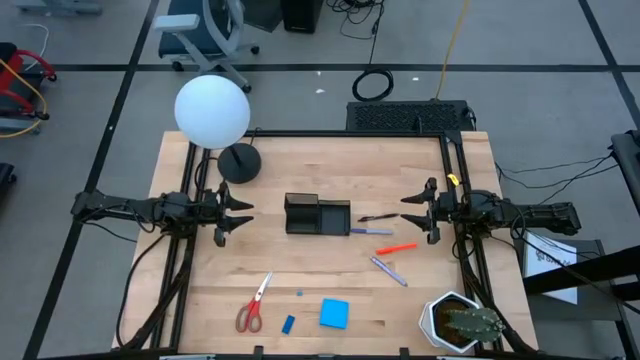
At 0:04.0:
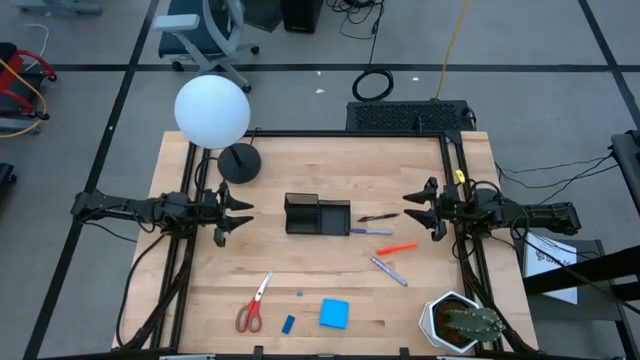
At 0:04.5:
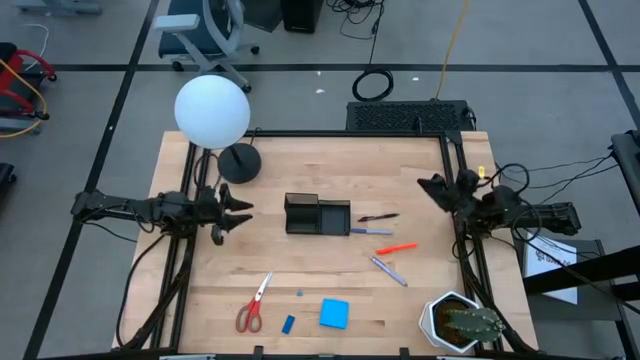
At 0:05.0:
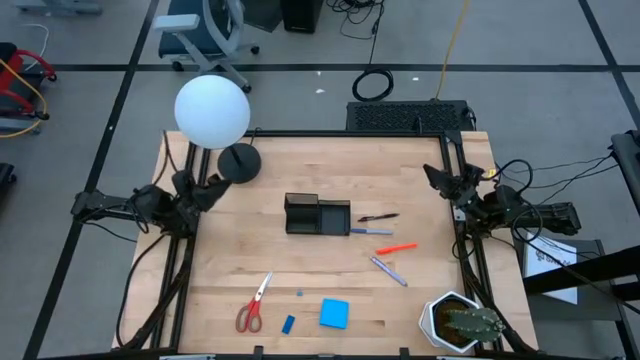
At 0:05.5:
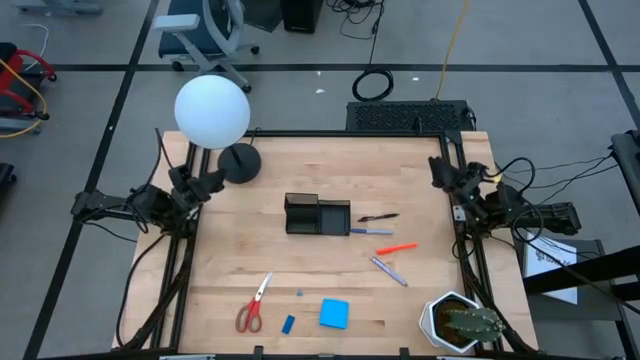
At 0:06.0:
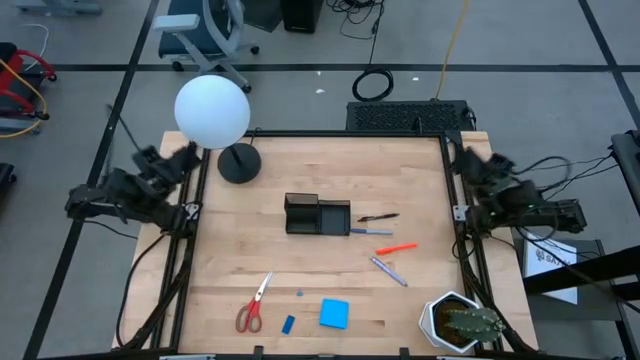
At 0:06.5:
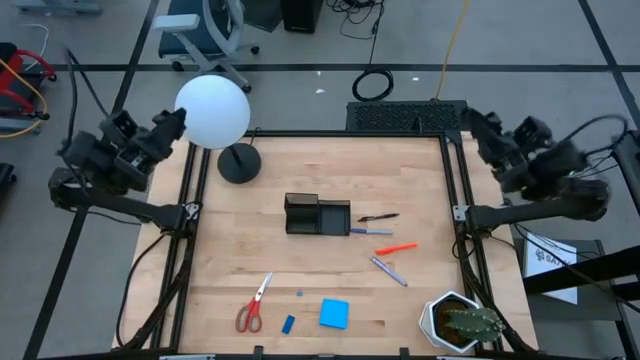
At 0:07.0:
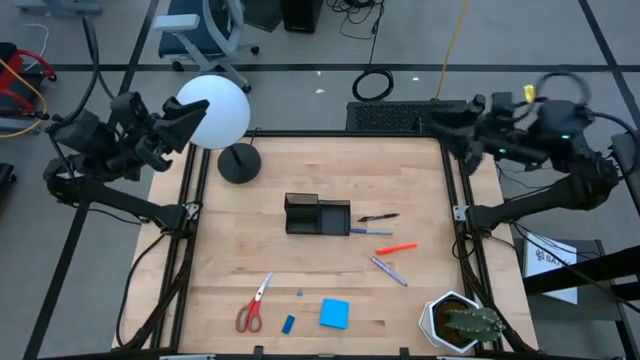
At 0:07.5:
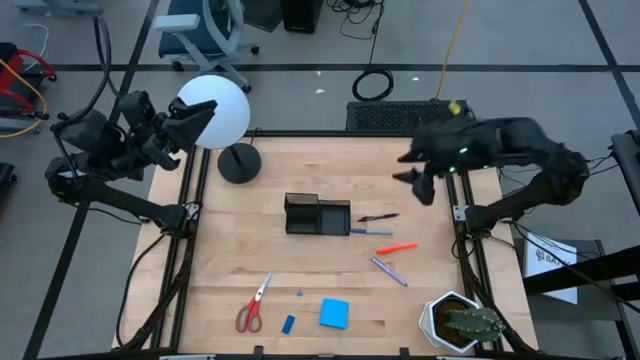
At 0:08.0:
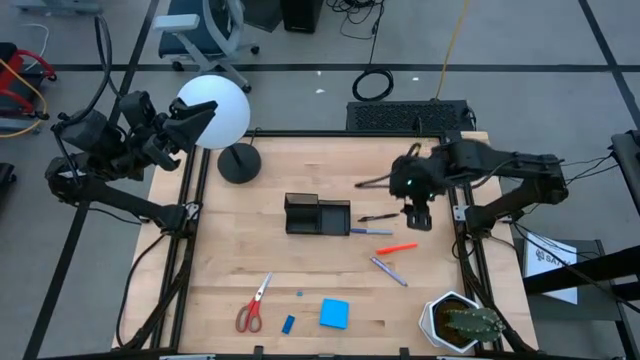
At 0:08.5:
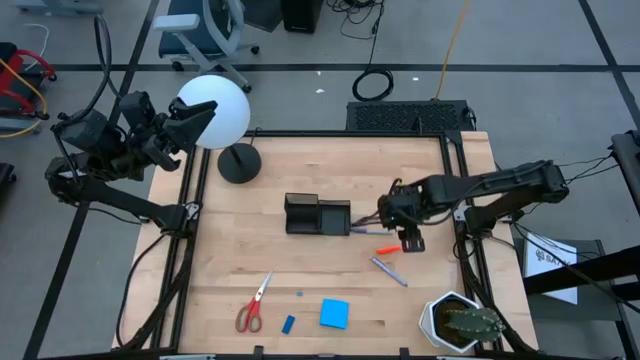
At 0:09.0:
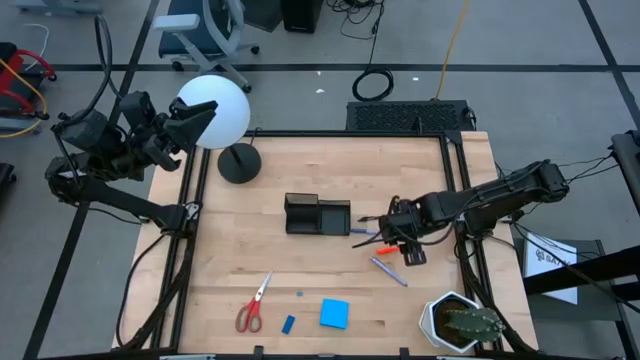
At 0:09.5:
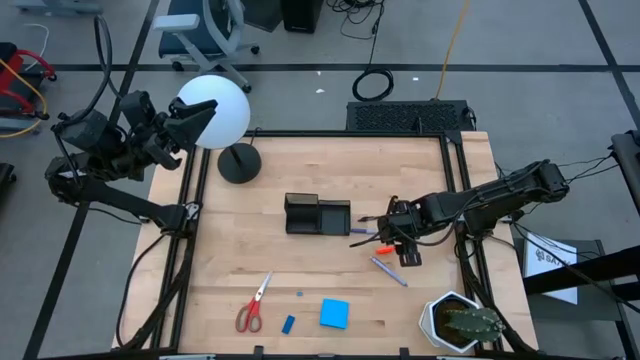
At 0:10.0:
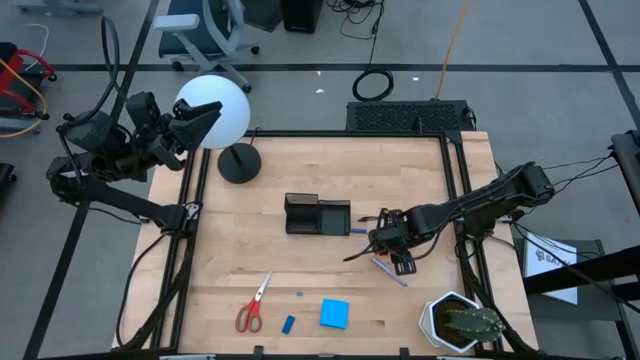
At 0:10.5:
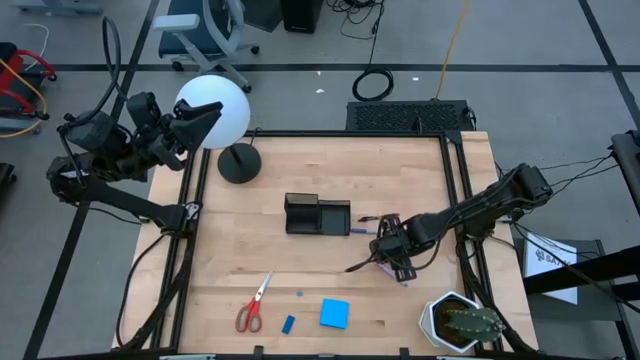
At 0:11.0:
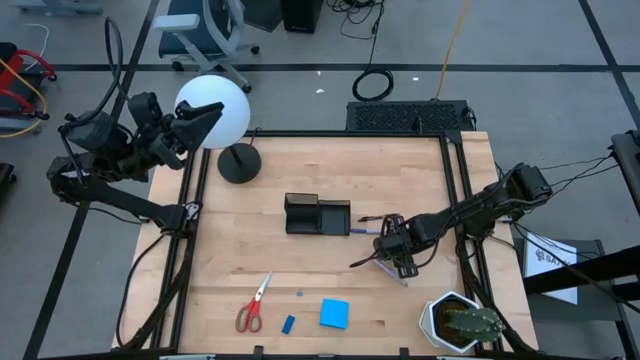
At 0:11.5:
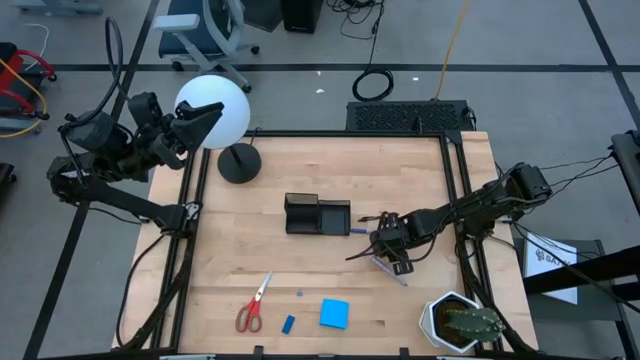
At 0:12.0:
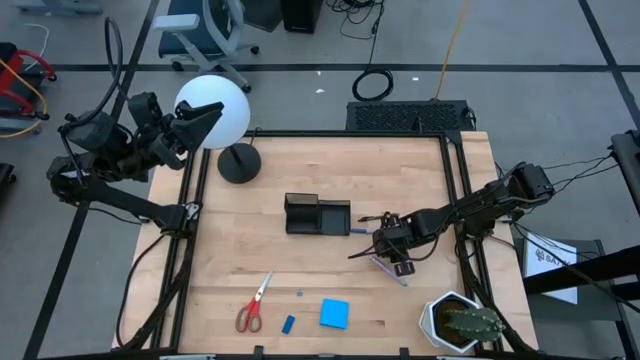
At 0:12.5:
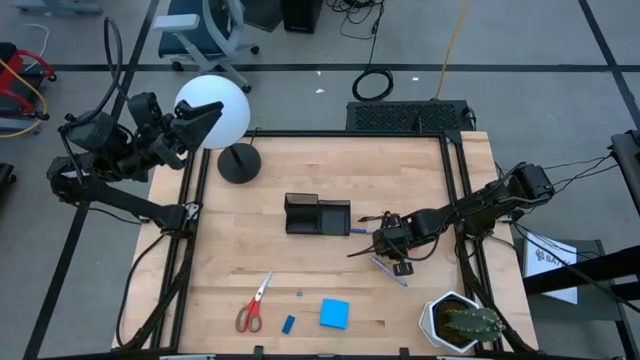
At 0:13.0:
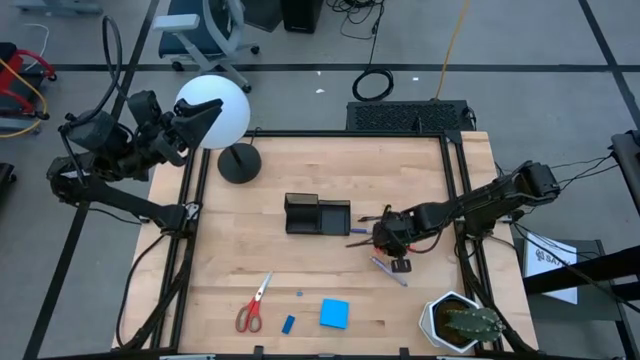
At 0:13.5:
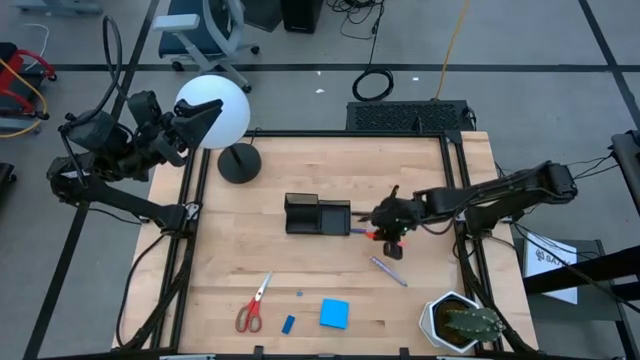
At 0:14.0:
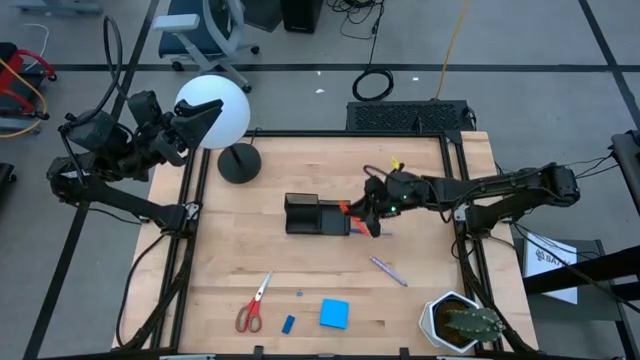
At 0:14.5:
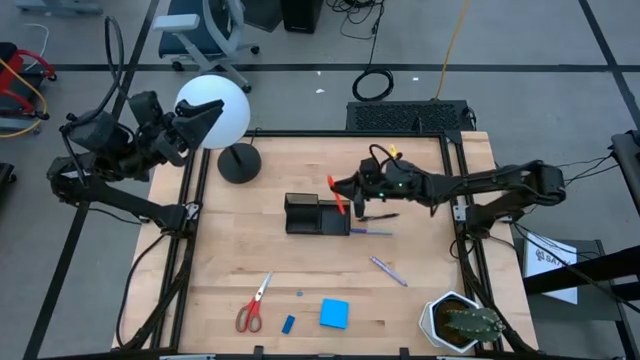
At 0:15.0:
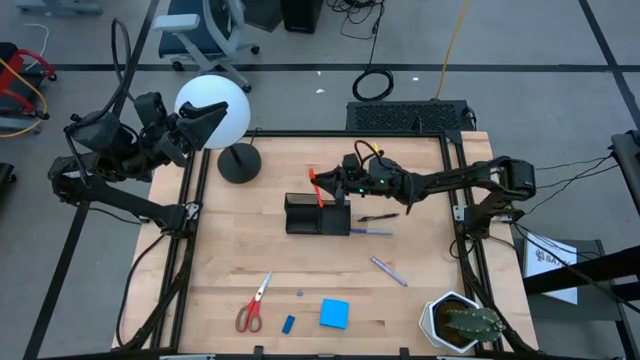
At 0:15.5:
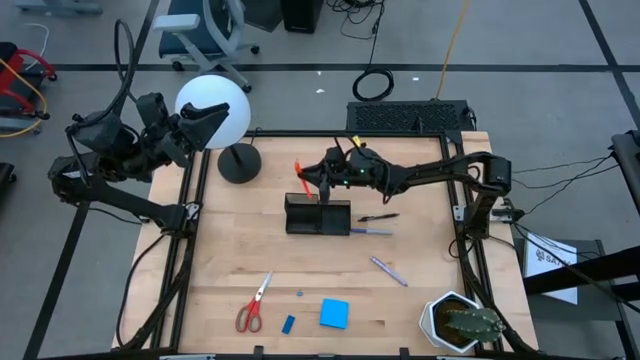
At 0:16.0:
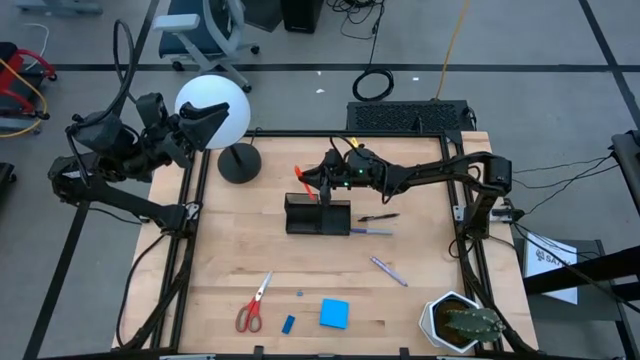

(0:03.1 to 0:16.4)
Task: Pick and place office supplies into organizer
Put the orange pen into the desk organizer

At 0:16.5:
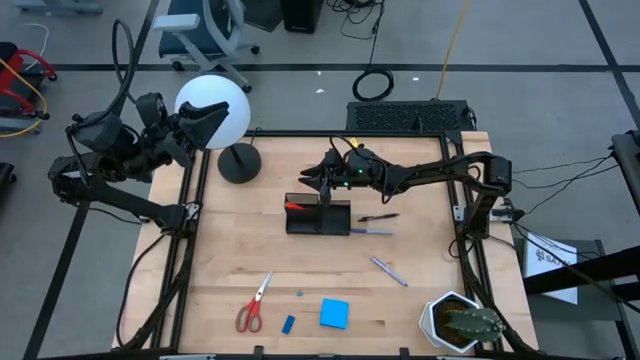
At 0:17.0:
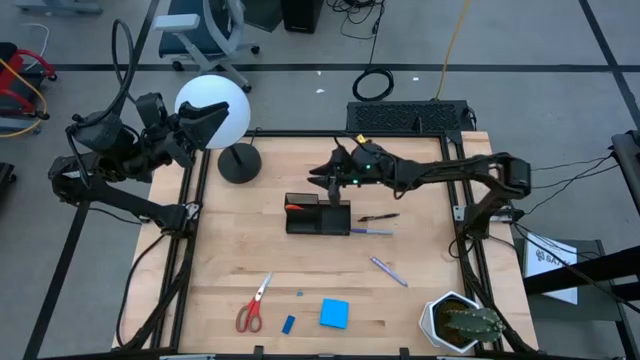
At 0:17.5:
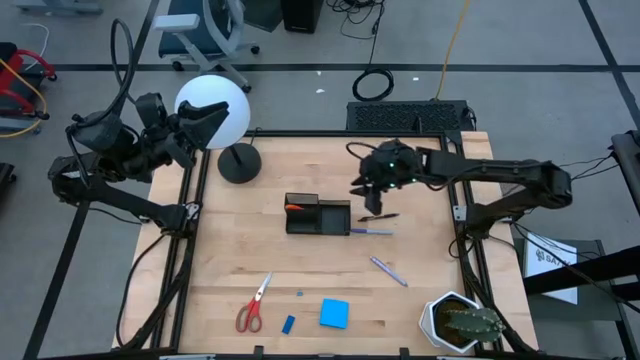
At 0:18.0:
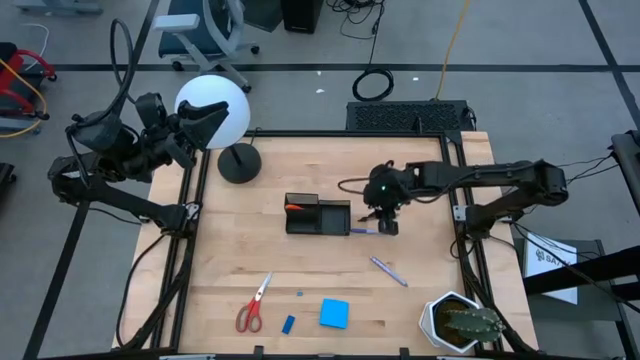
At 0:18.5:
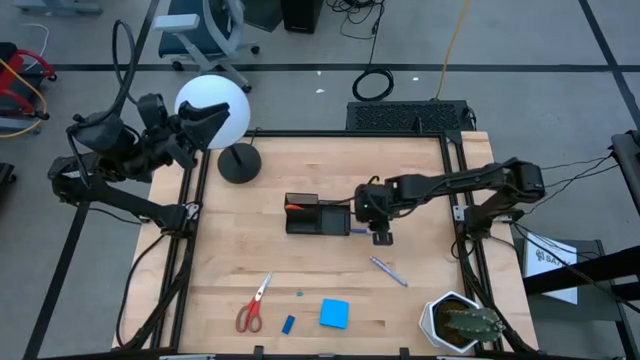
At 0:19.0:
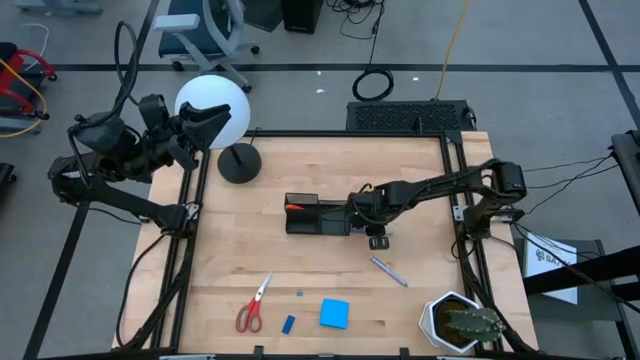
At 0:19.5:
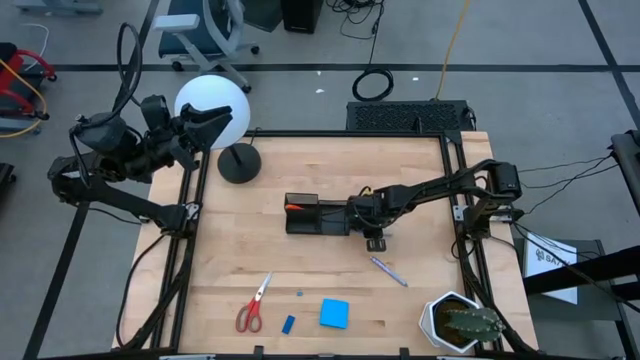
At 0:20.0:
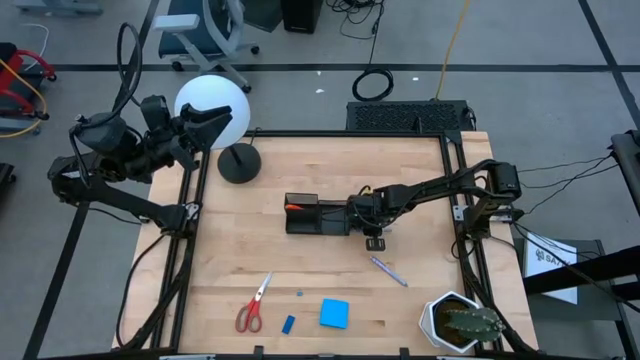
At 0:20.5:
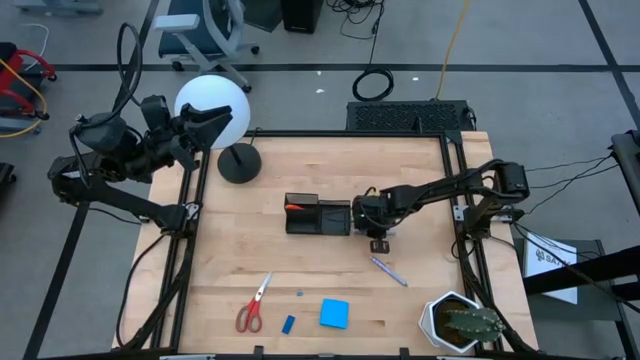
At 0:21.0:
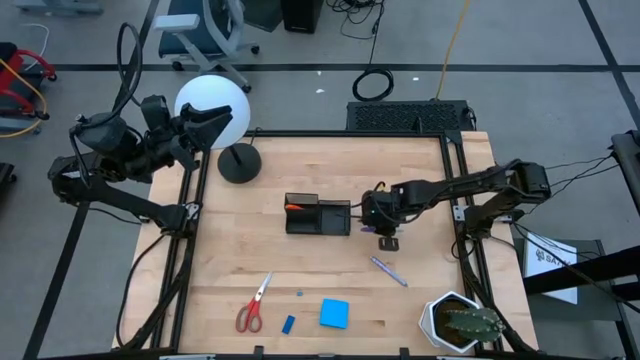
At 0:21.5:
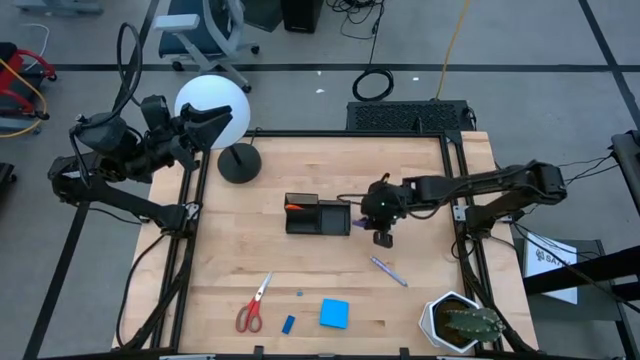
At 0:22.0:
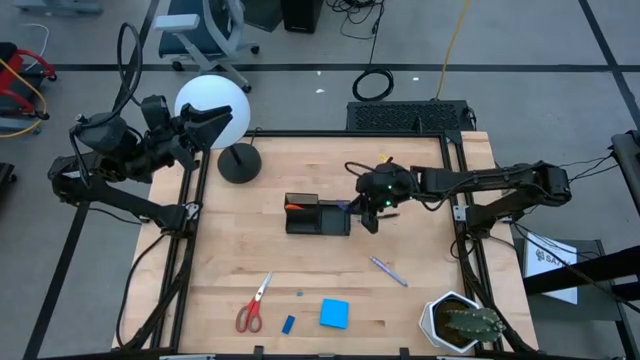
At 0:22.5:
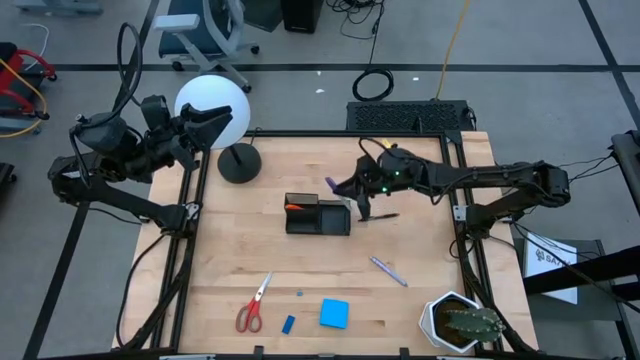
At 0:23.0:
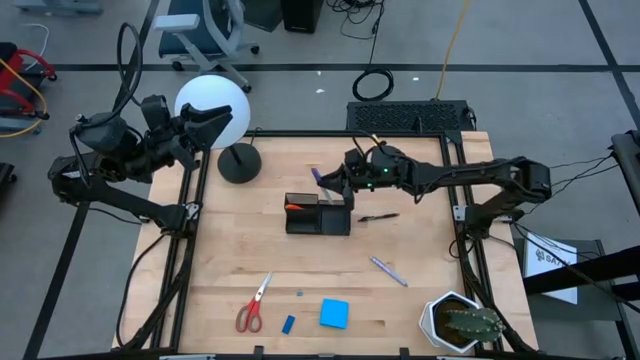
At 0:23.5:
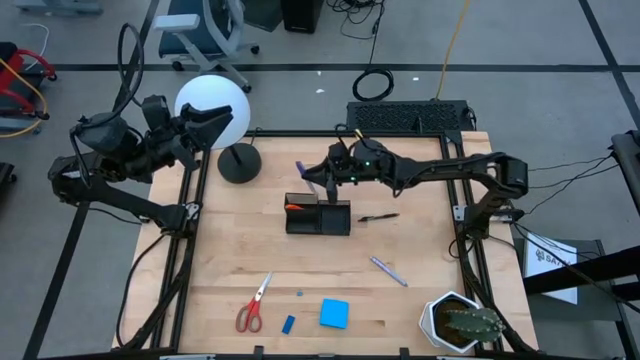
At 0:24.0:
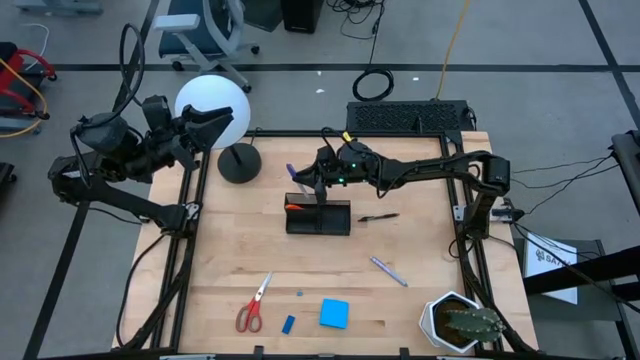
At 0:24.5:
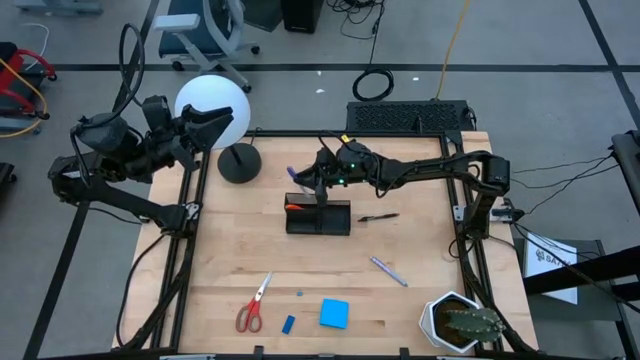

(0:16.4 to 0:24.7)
Put the blue pen into the desk organizer
